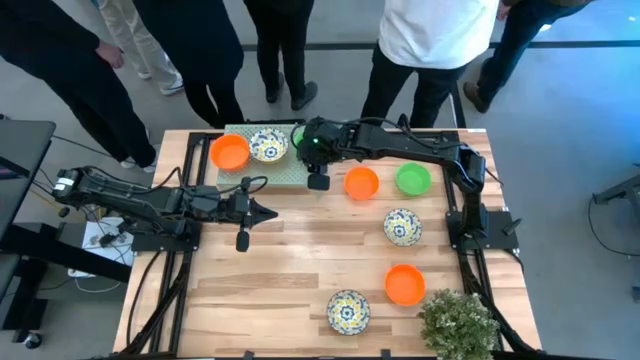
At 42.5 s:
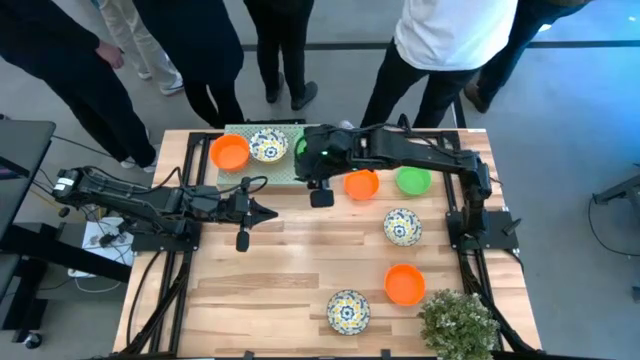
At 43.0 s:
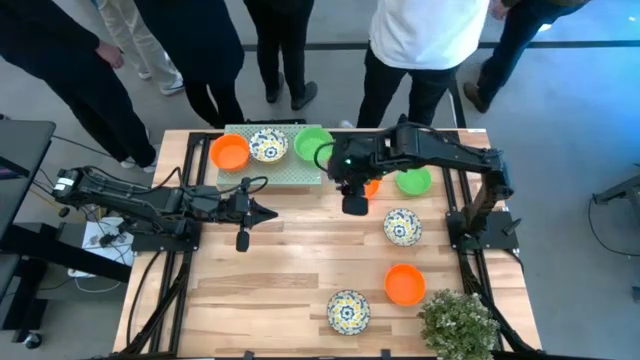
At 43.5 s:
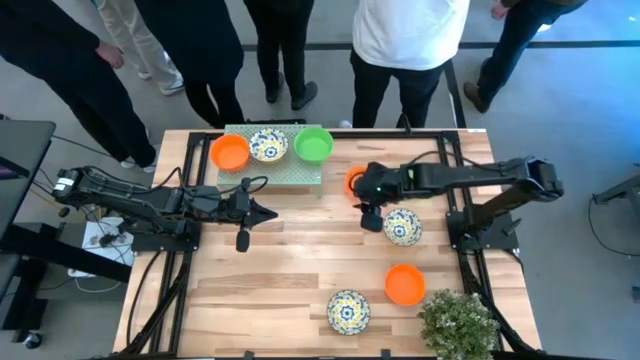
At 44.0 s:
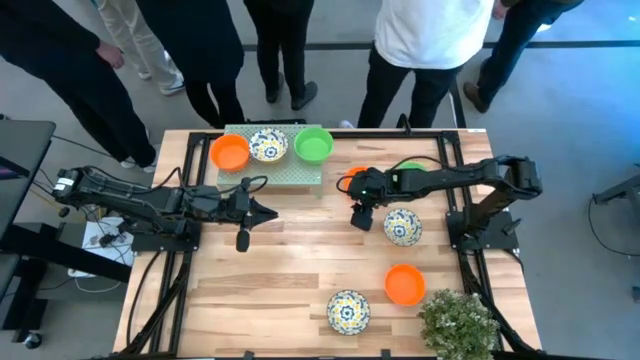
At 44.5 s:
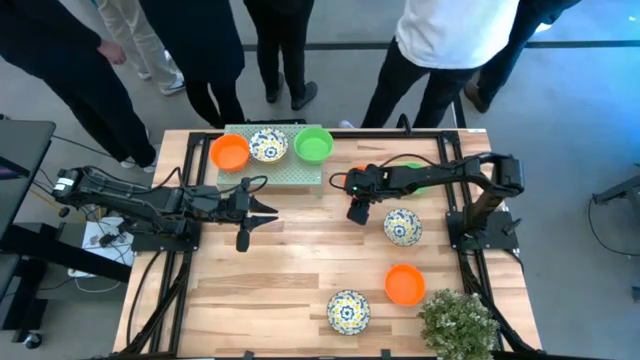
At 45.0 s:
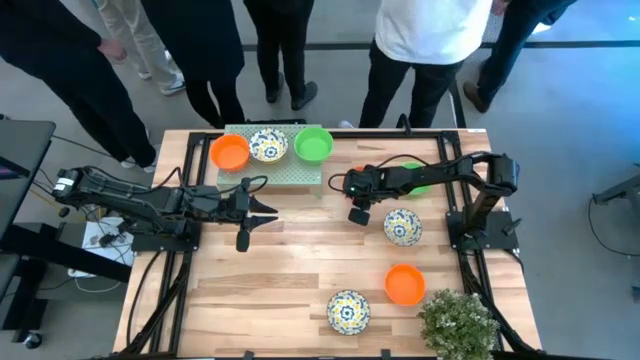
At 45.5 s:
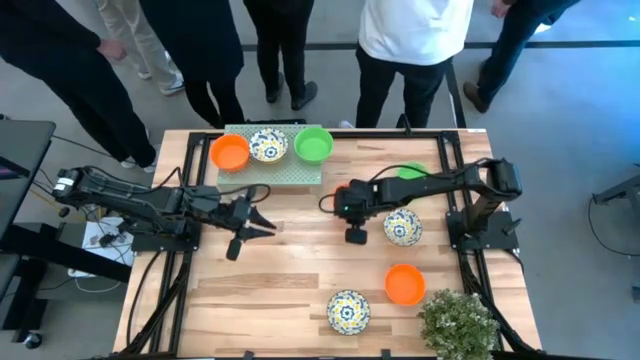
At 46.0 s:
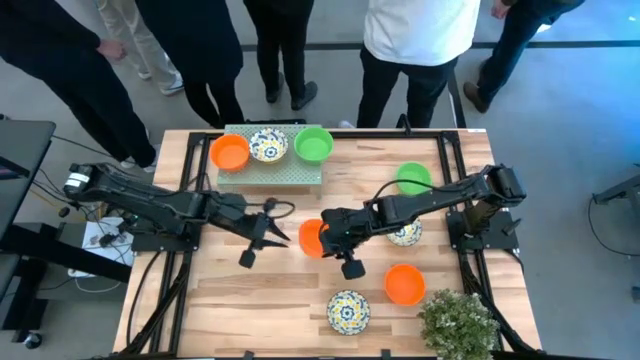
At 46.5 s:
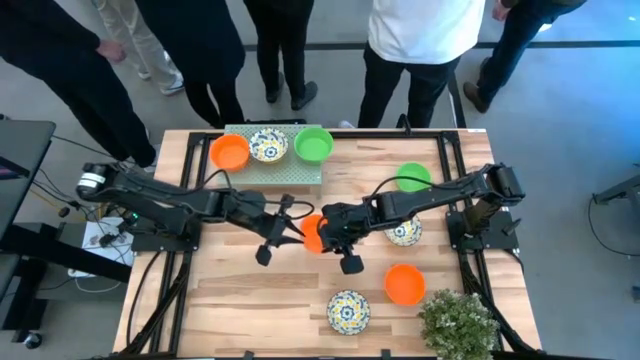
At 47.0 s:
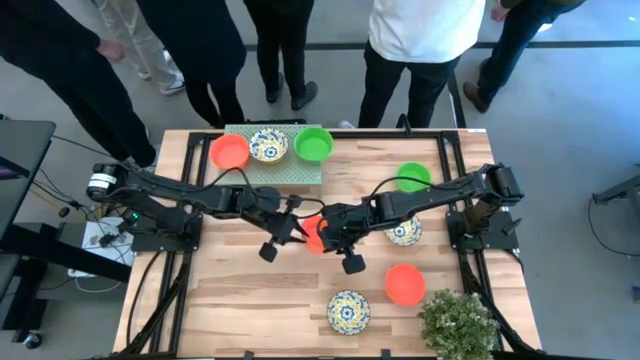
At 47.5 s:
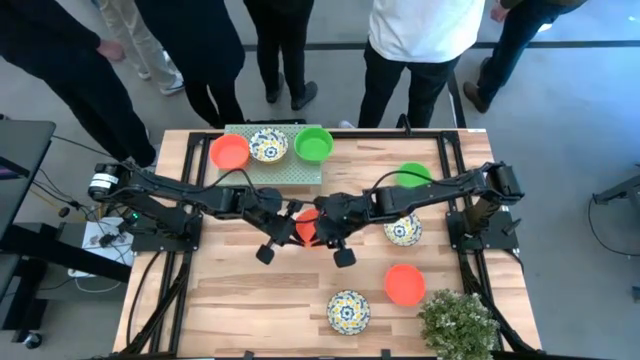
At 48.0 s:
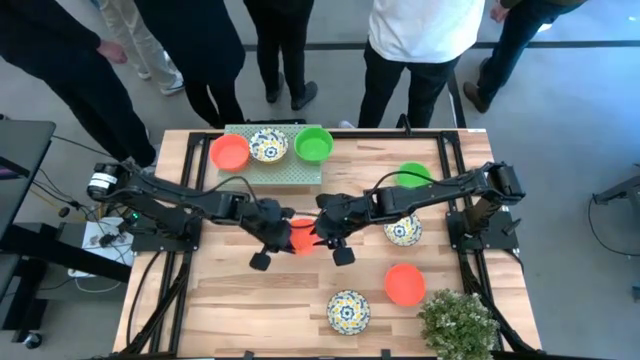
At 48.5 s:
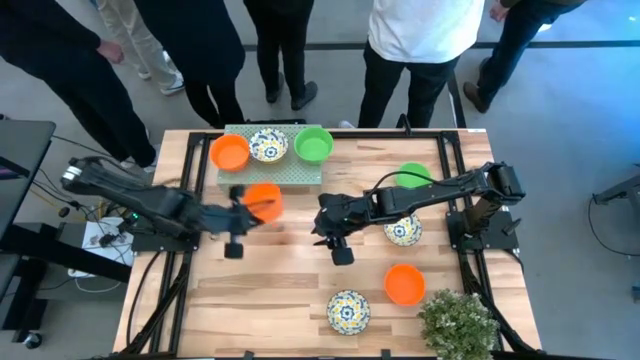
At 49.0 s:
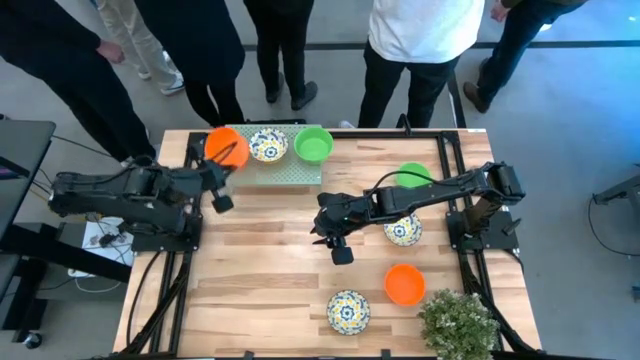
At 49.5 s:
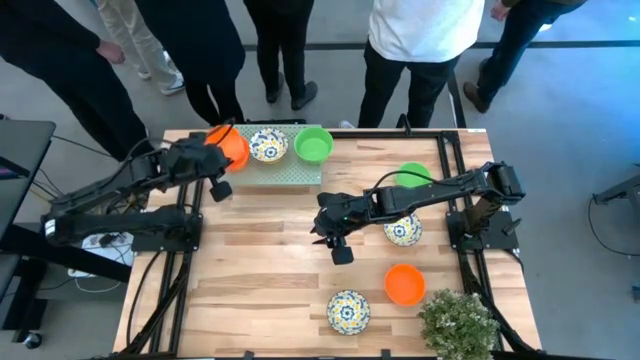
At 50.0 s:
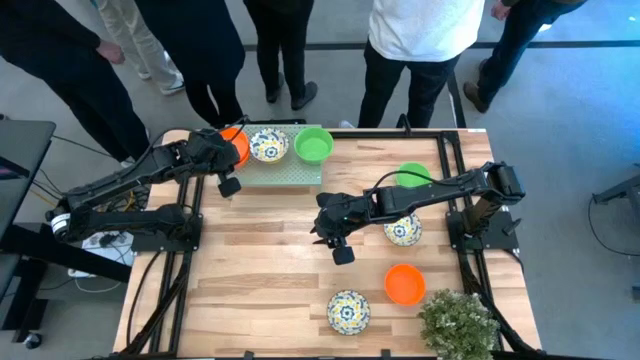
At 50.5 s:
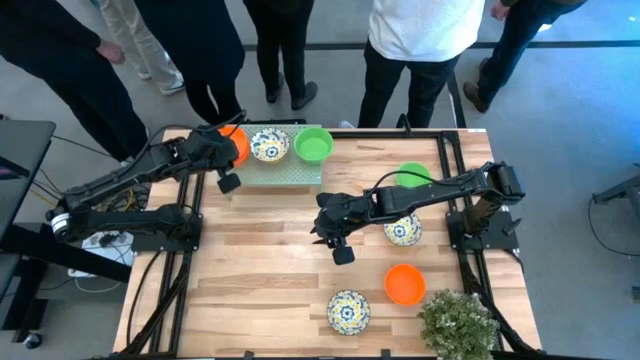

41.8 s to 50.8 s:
Task: Pick & Place Mini bowls
Stack the orange bowl on top of the other orange bowl on the shelf

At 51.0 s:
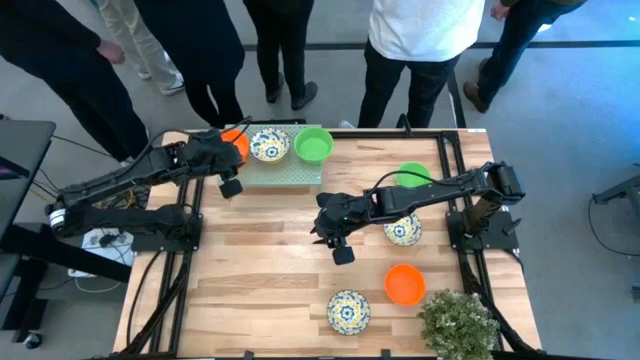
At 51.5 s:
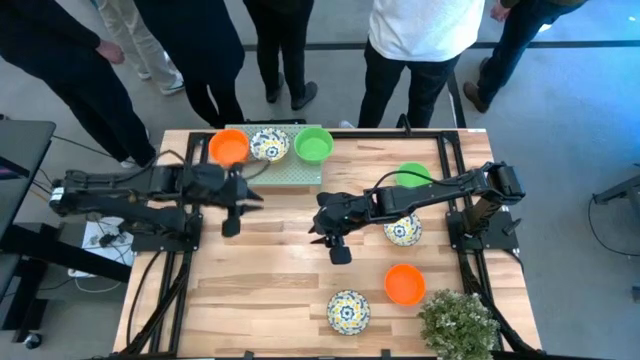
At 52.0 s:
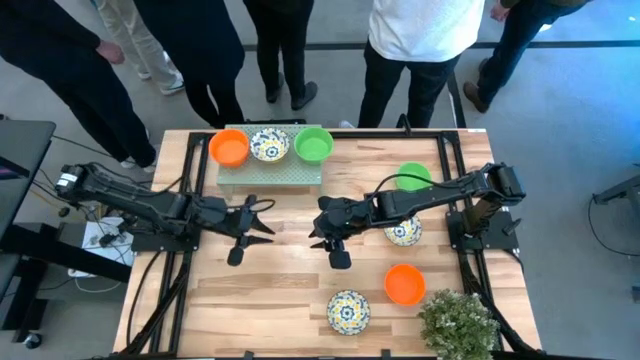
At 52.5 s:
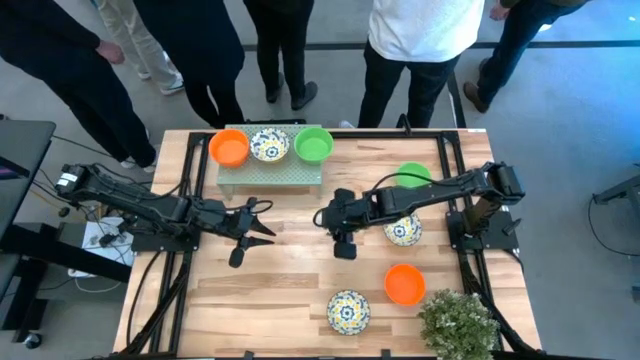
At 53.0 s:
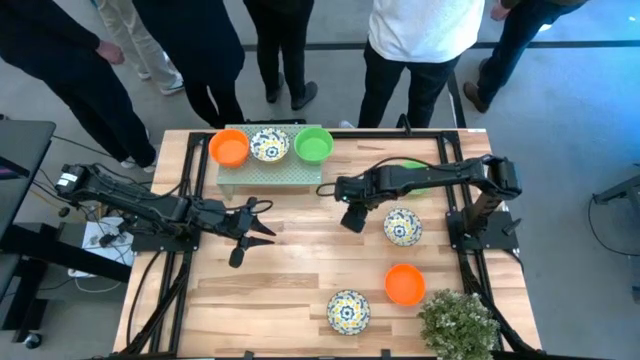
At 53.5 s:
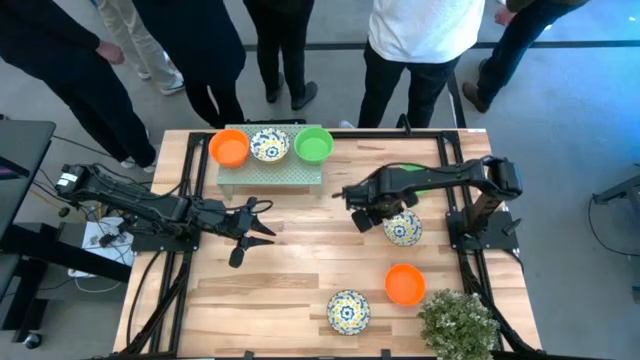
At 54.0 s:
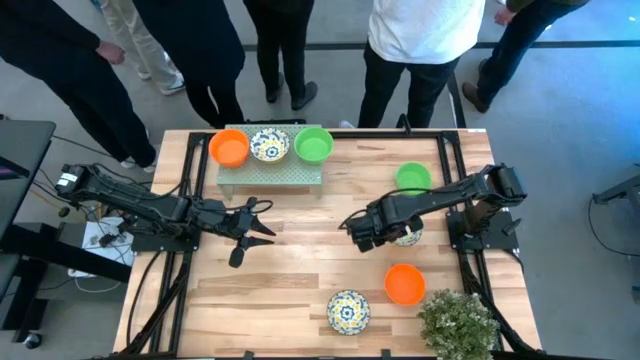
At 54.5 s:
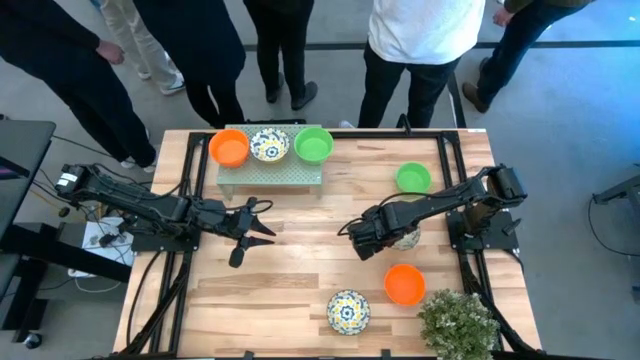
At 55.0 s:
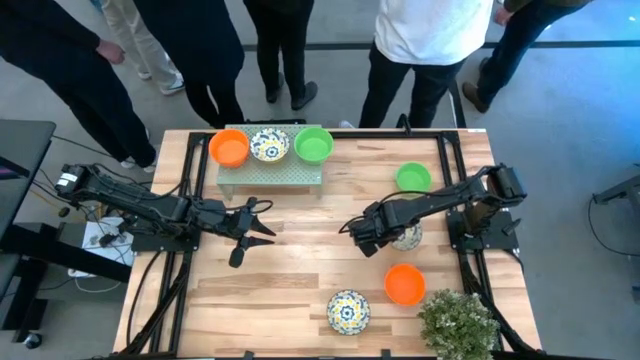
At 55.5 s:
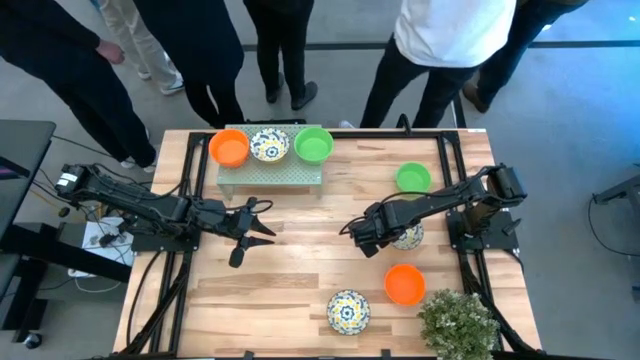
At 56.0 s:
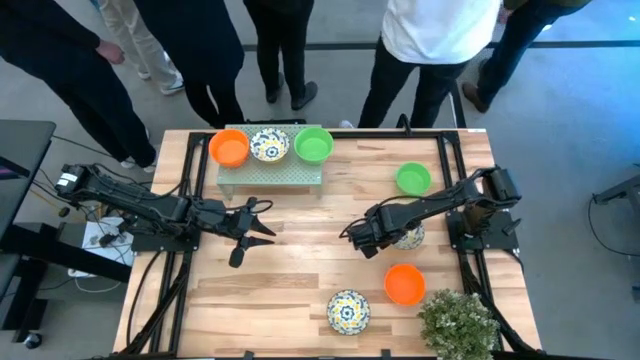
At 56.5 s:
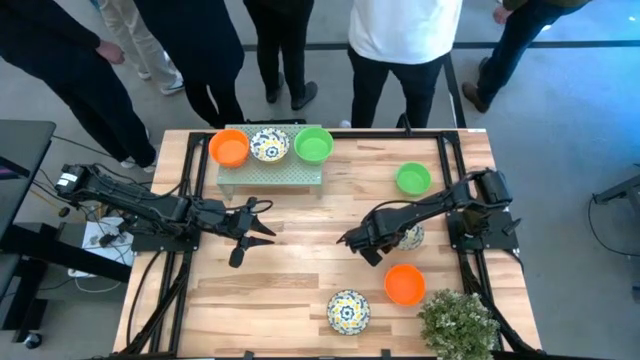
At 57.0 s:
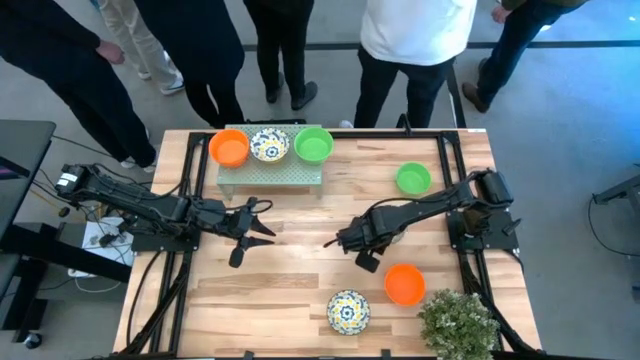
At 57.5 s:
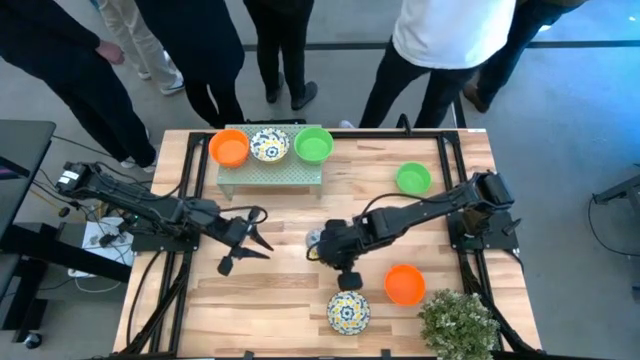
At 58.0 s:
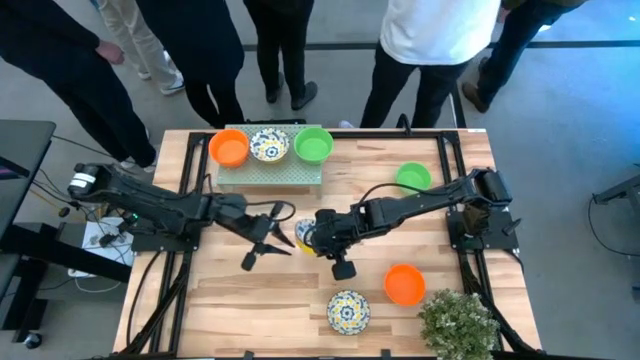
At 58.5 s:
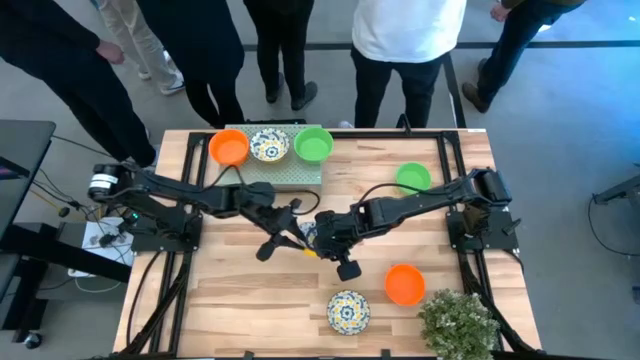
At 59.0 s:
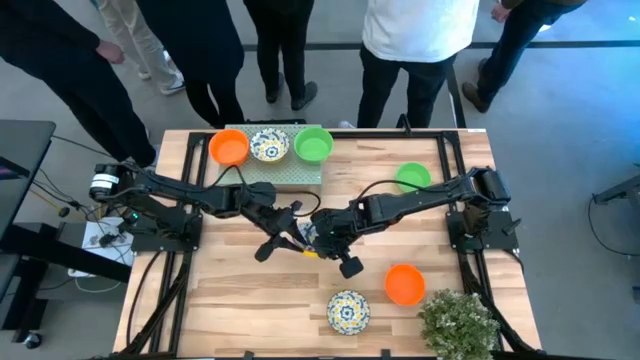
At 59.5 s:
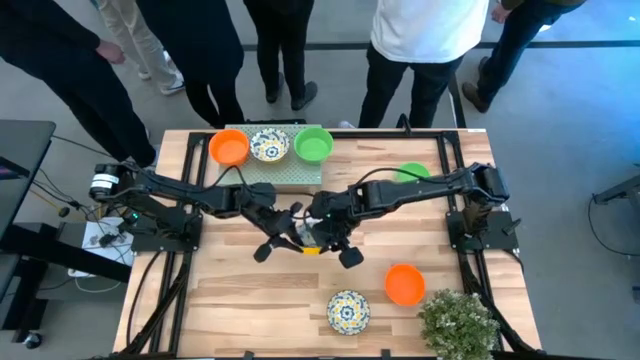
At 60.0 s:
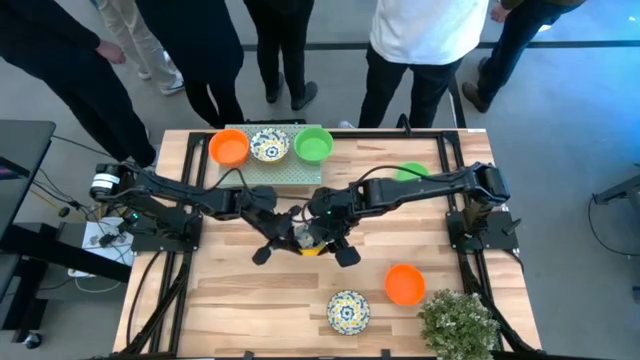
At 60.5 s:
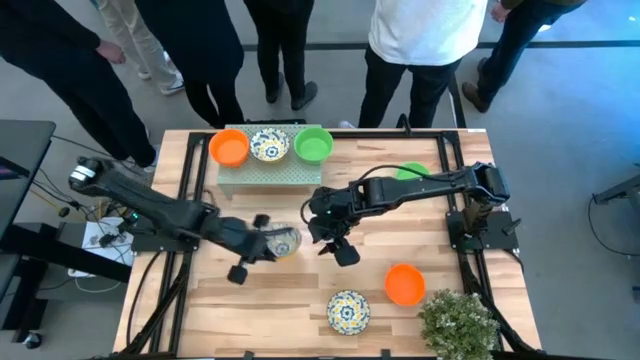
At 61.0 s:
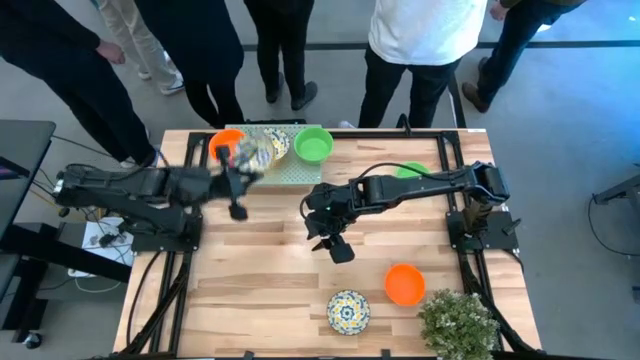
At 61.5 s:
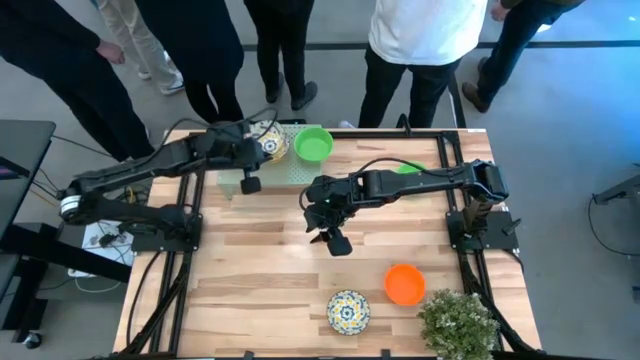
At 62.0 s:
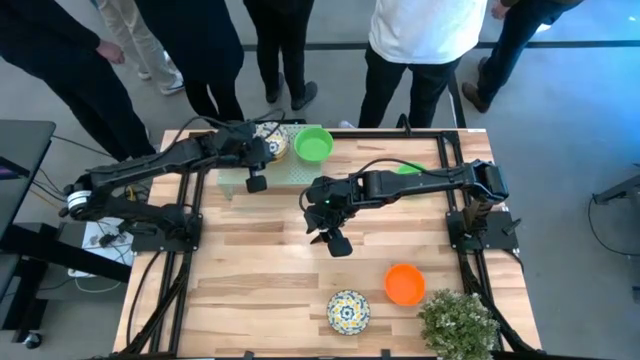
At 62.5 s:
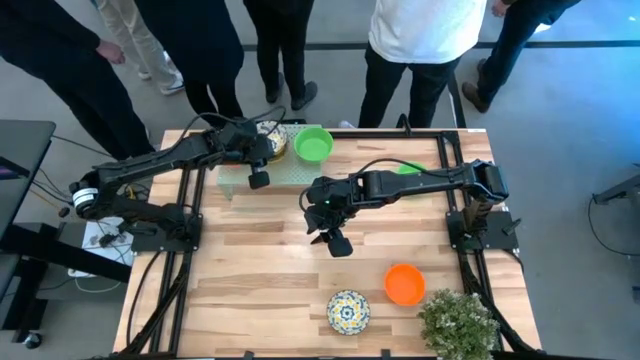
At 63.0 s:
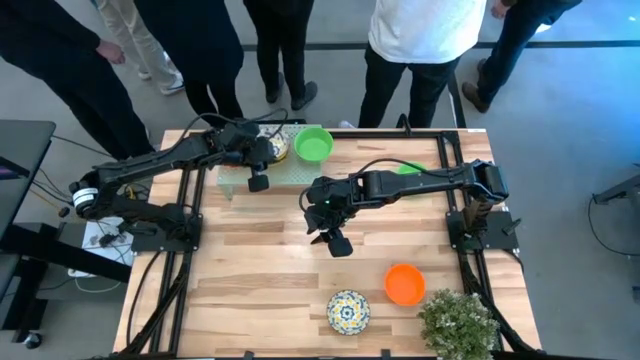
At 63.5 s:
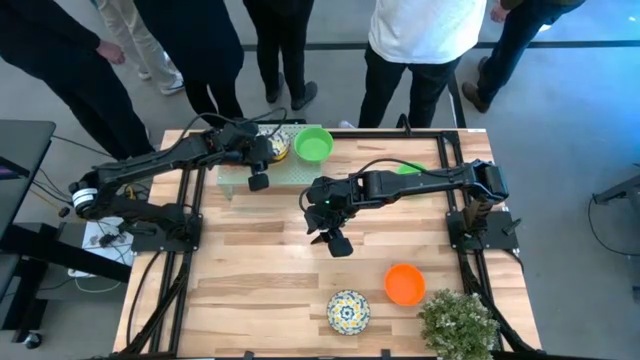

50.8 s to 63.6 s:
Stack the white patterned bowl on top of the other white patterned bowl on the shelf
